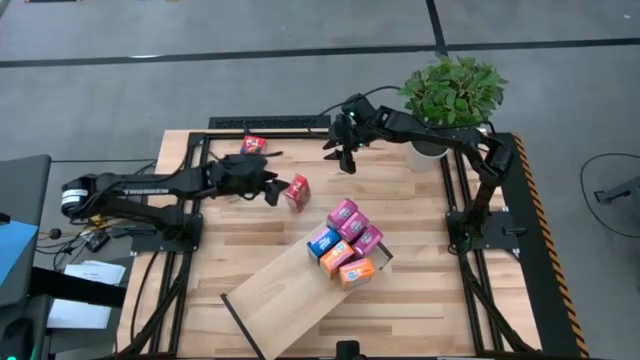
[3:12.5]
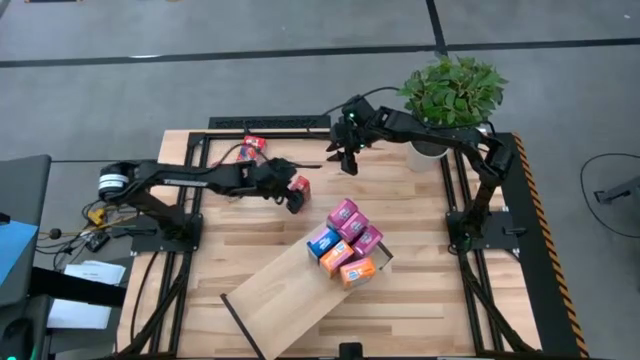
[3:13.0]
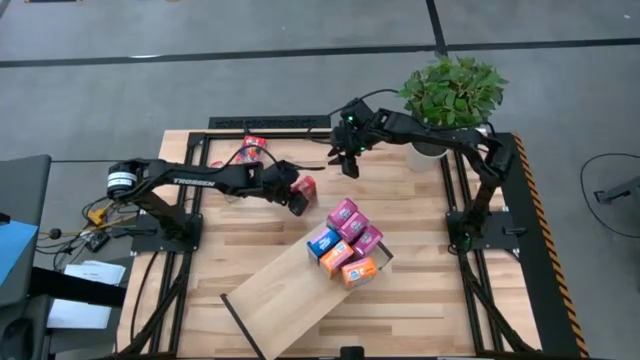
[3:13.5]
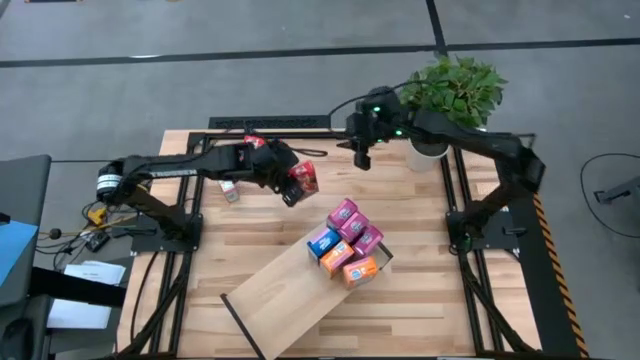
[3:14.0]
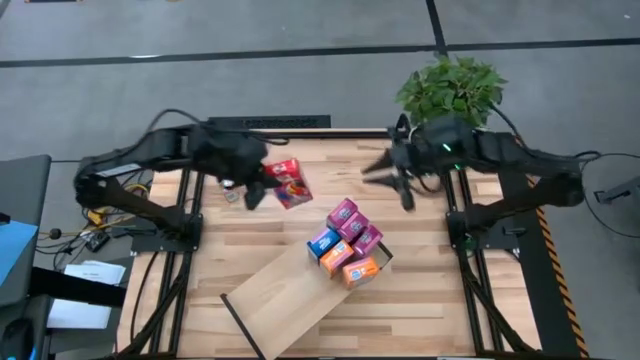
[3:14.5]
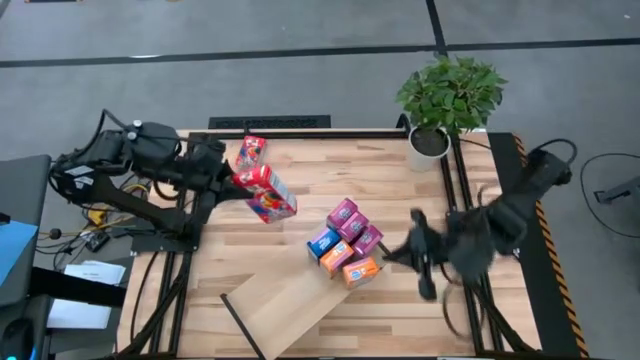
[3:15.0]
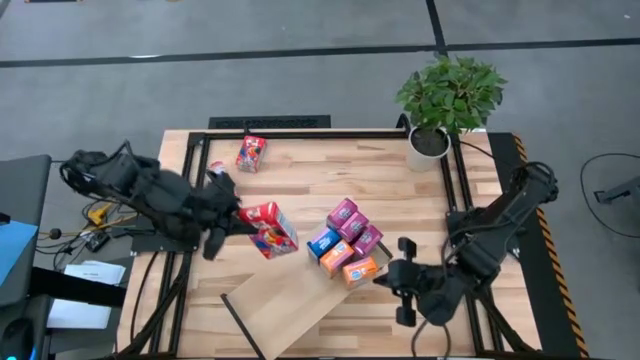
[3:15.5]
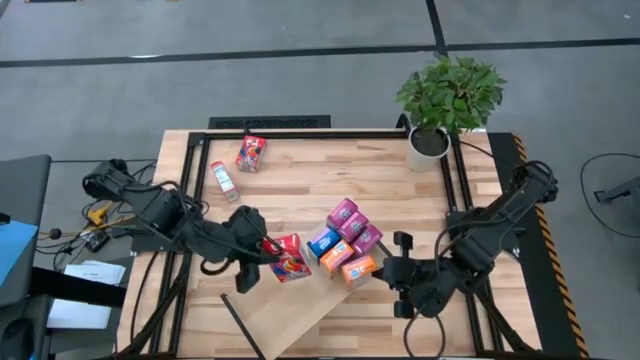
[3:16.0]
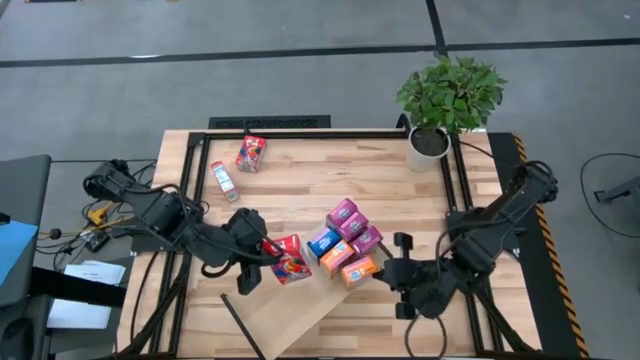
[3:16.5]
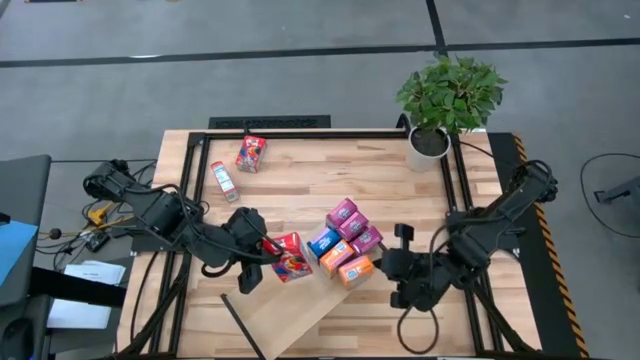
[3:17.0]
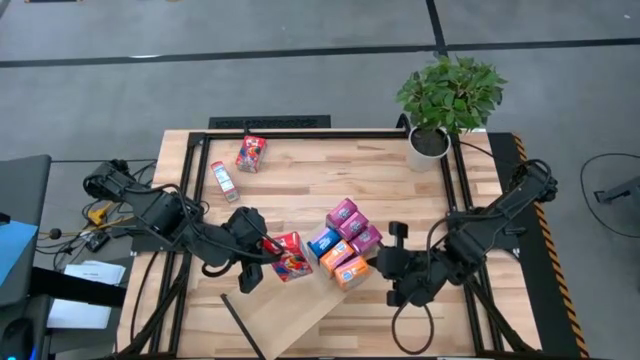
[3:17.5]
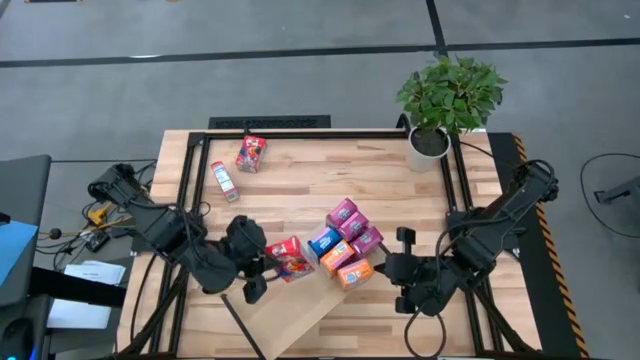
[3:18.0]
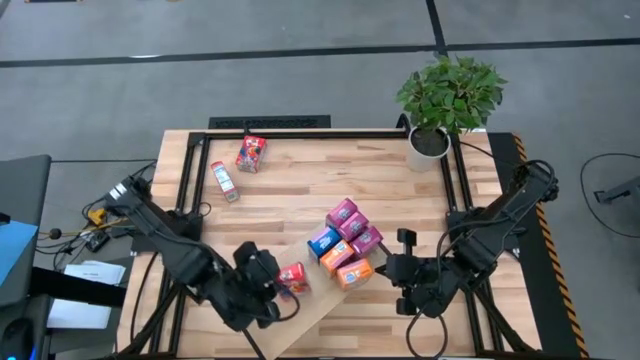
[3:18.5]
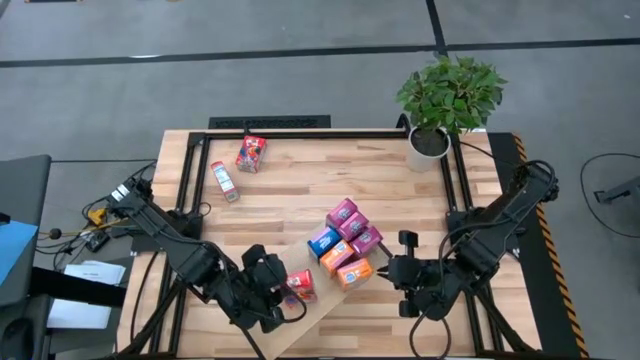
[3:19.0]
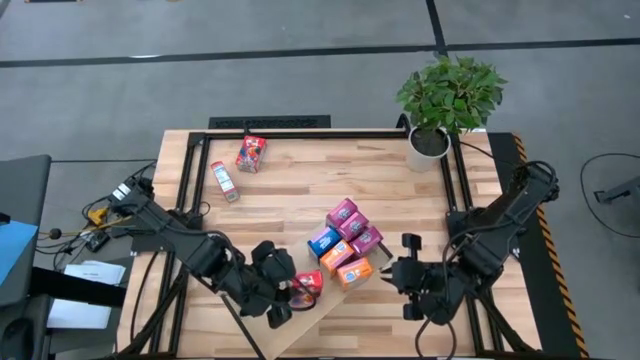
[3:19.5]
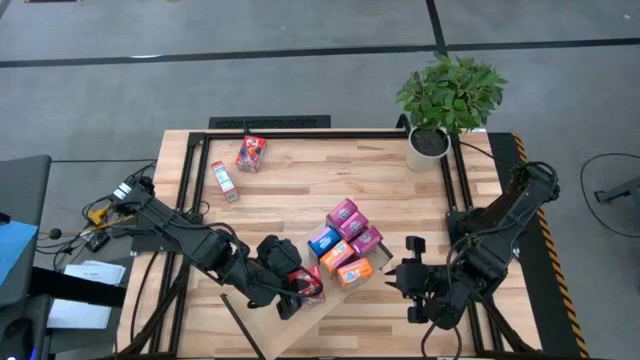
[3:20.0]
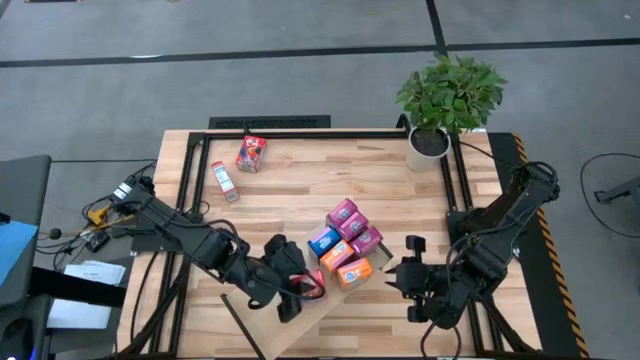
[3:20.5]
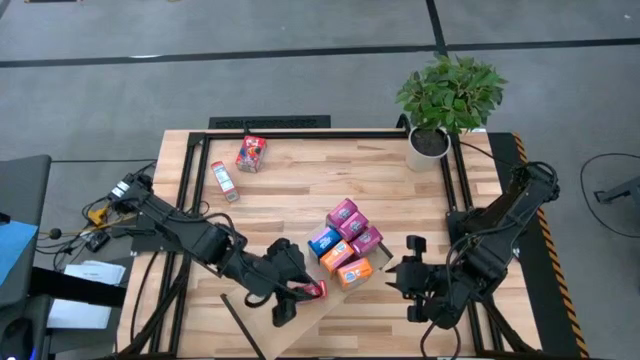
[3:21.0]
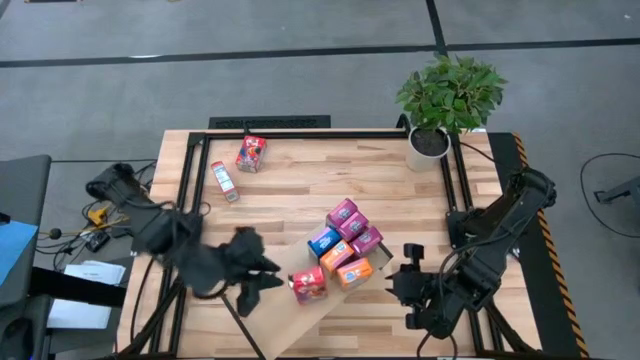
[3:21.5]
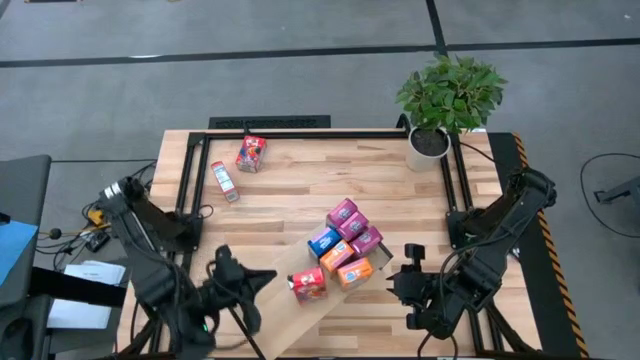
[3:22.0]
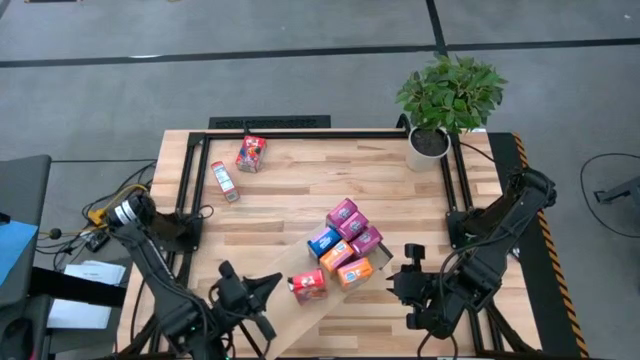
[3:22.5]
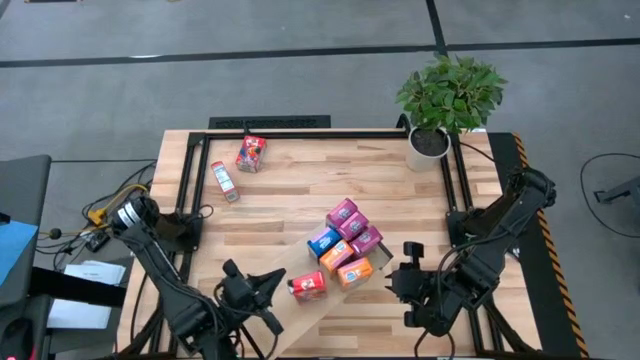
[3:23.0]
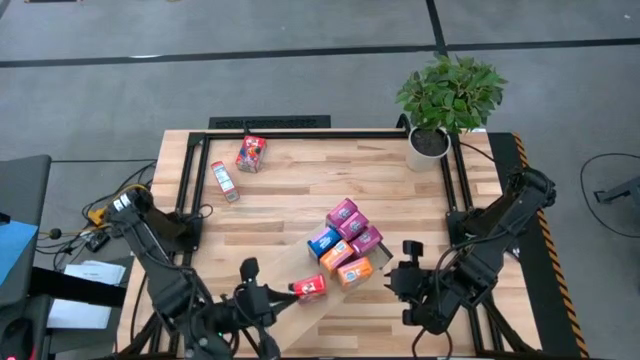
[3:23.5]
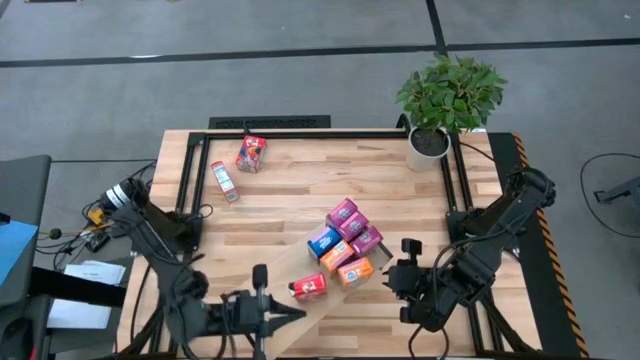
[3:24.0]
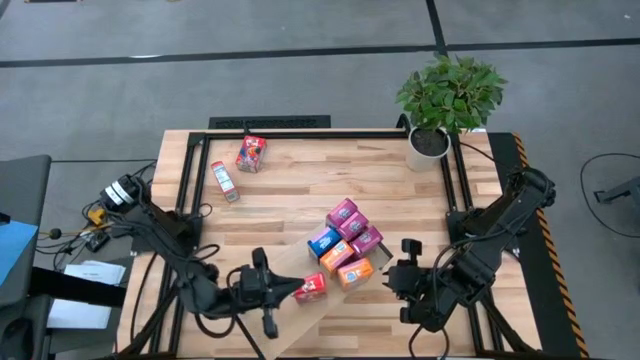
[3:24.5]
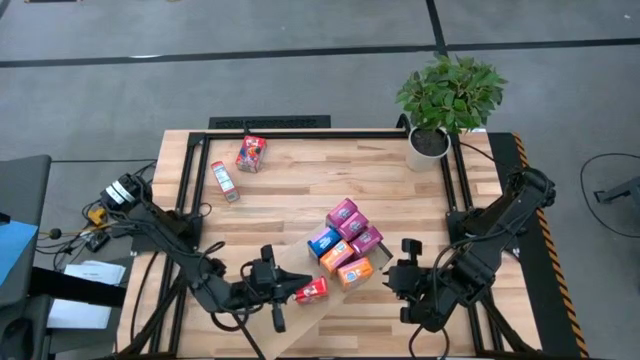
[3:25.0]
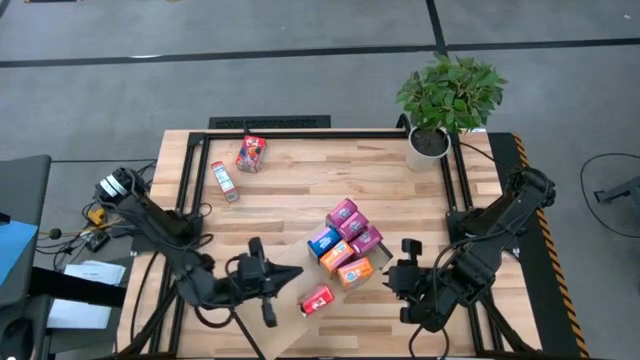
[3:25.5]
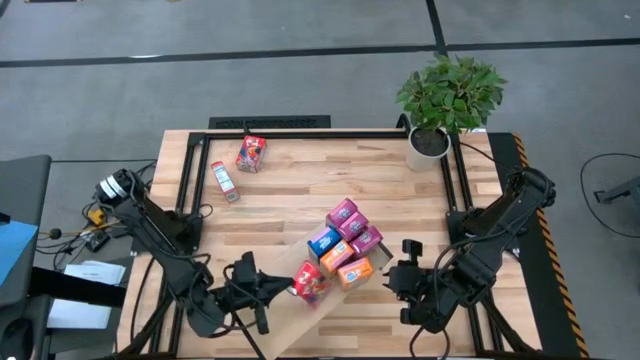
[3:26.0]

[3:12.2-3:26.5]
Task: Stack cereal on shelf
Put the right red cereal box onto the shelf

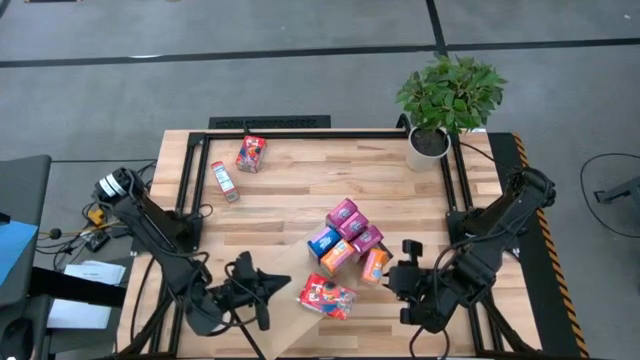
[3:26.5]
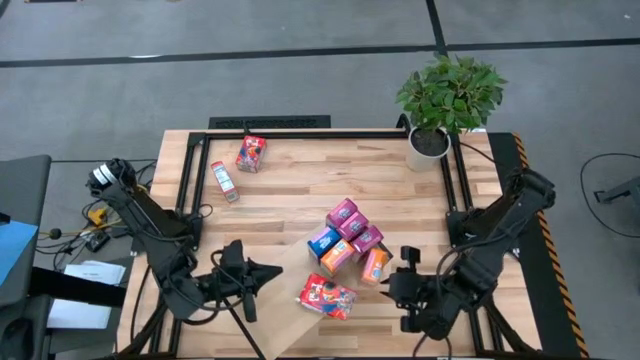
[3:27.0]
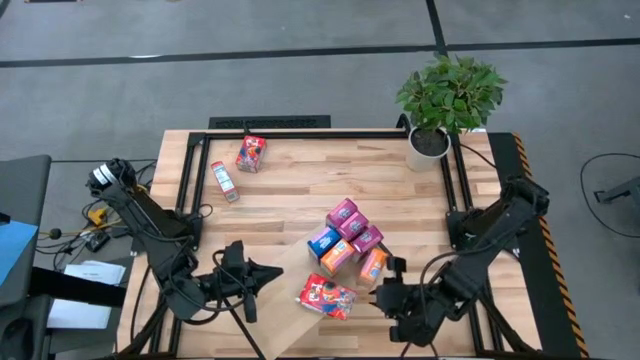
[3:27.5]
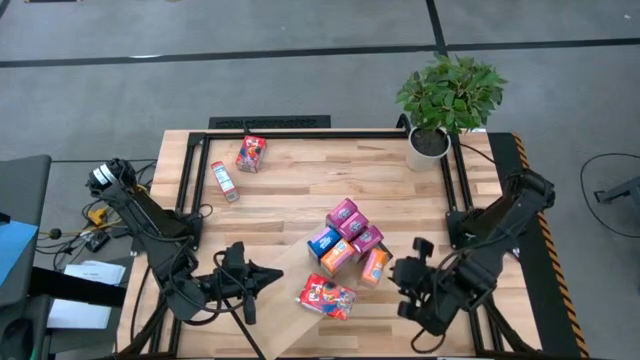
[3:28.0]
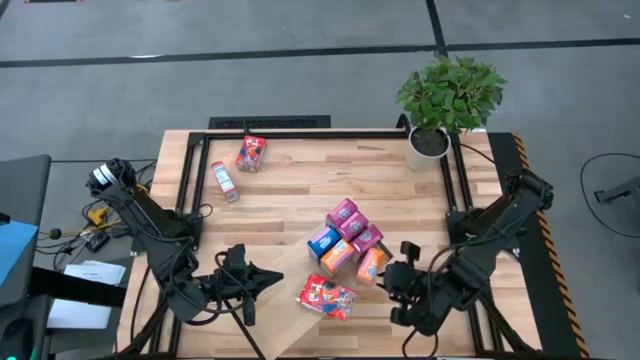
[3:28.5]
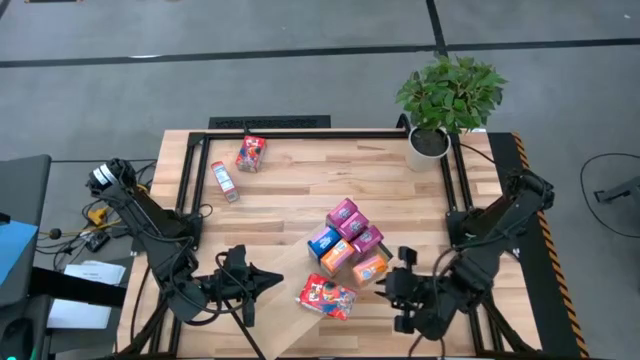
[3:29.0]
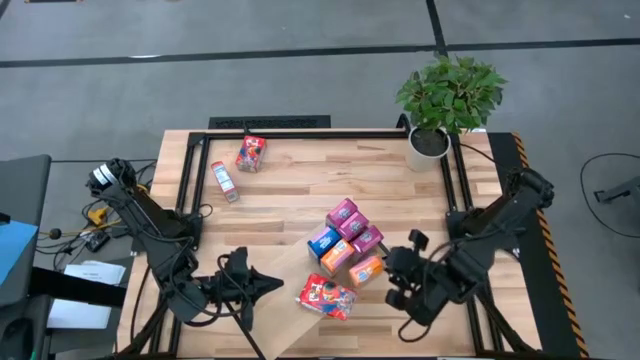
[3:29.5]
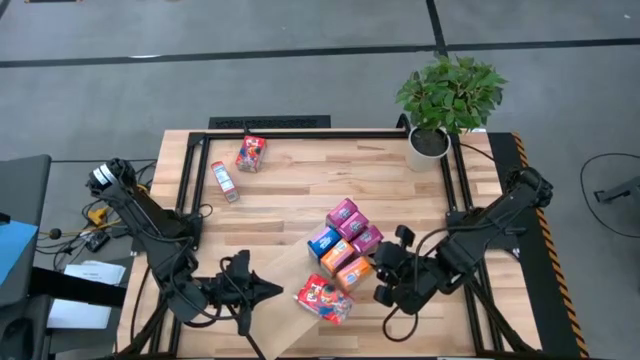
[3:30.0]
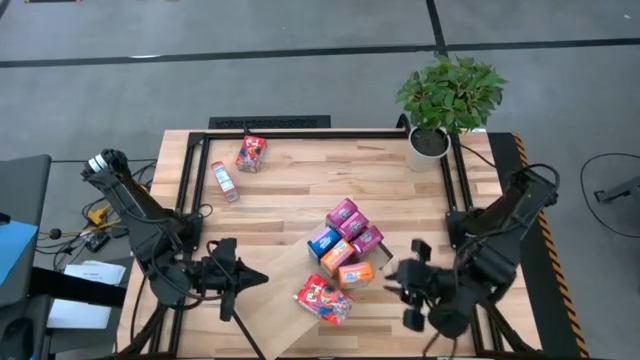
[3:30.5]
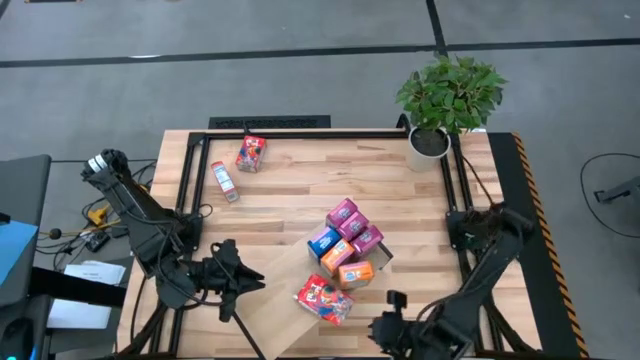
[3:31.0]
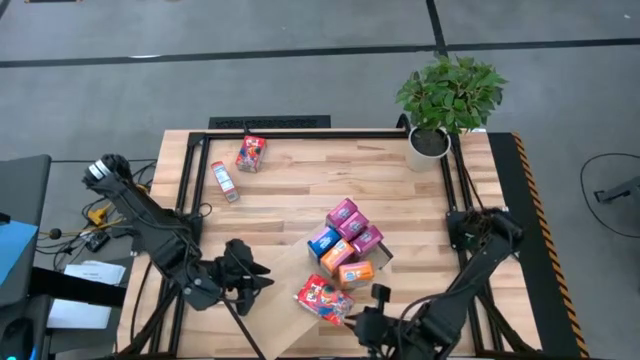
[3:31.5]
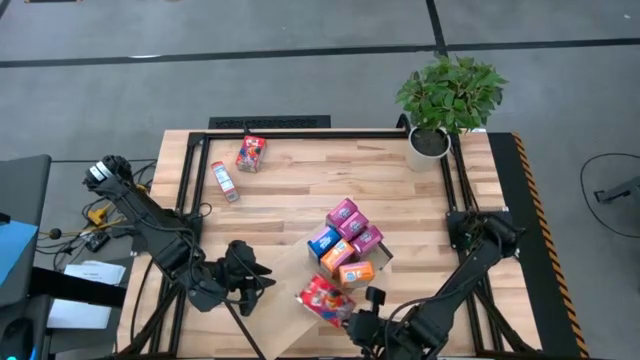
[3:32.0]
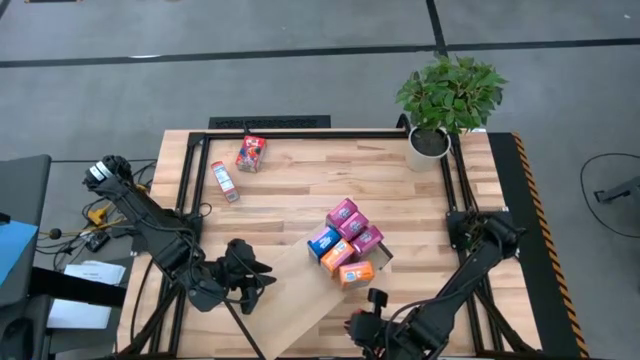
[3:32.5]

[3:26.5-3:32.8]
Remove the red cereal box from the shelf
